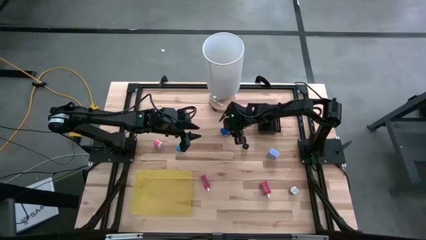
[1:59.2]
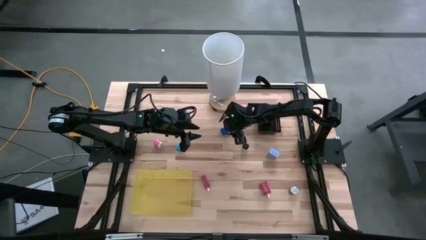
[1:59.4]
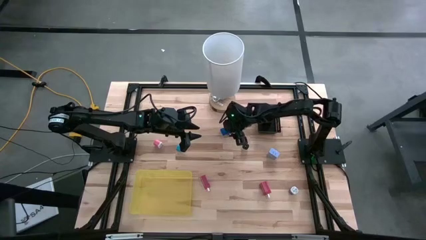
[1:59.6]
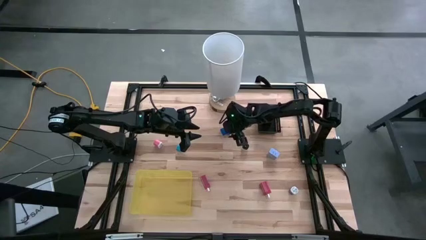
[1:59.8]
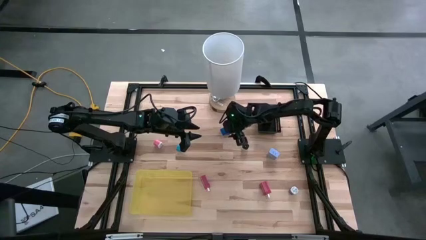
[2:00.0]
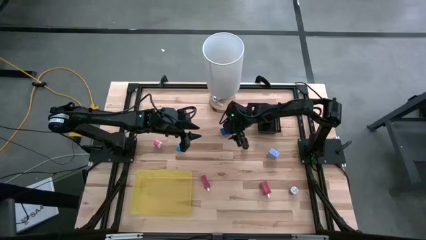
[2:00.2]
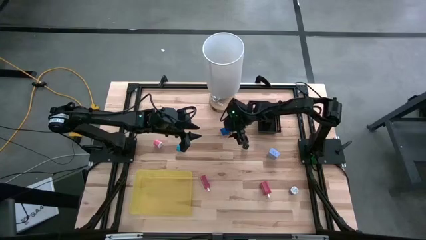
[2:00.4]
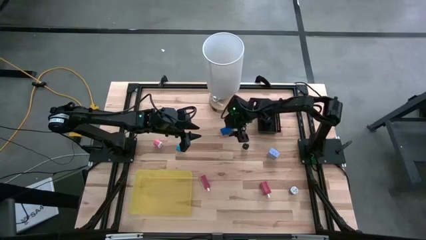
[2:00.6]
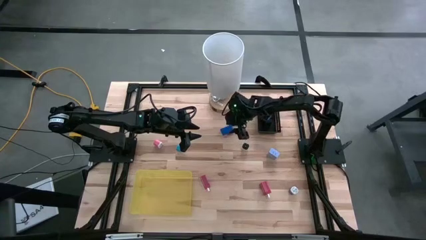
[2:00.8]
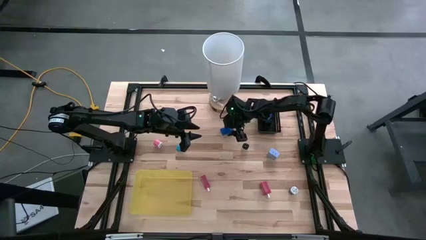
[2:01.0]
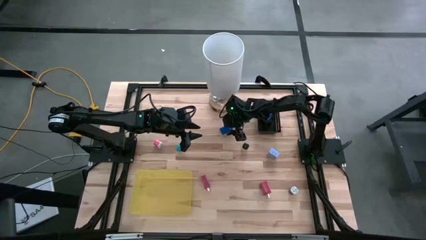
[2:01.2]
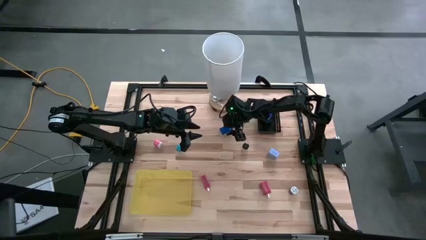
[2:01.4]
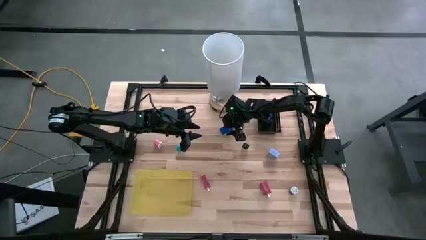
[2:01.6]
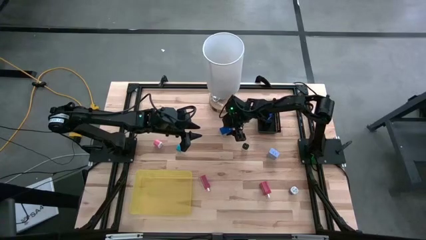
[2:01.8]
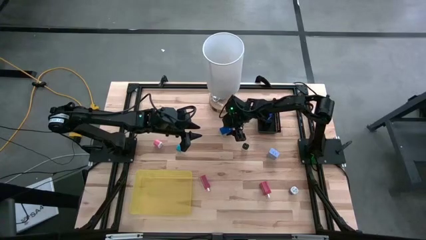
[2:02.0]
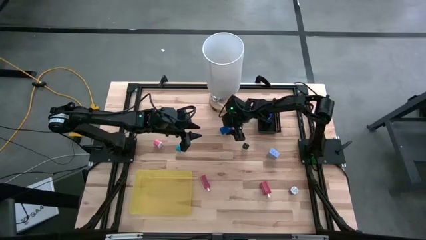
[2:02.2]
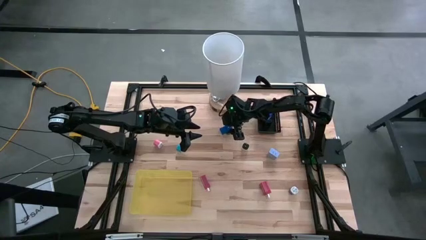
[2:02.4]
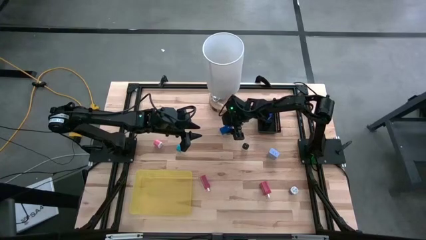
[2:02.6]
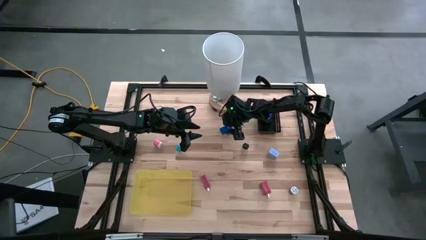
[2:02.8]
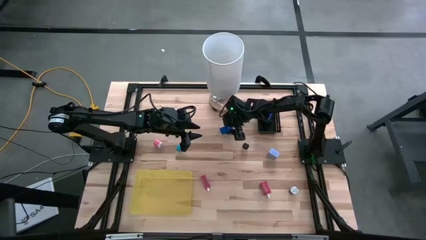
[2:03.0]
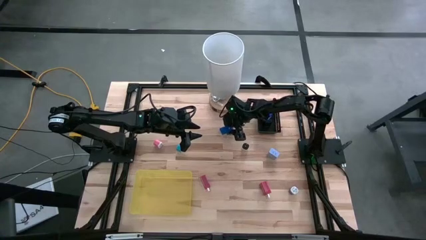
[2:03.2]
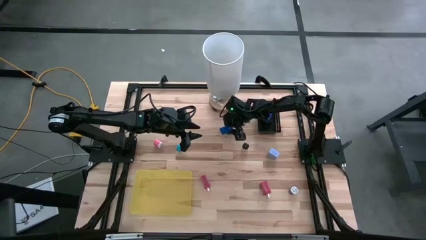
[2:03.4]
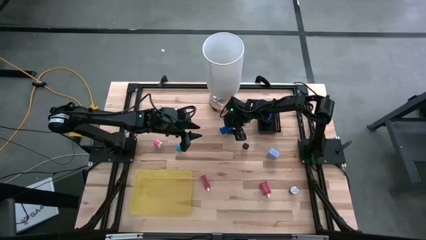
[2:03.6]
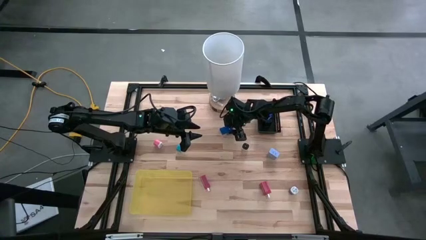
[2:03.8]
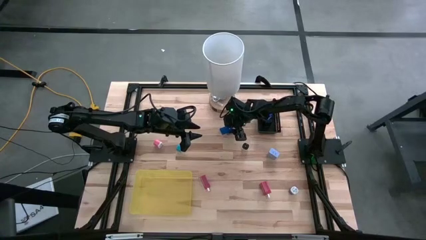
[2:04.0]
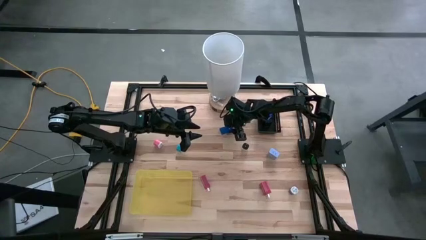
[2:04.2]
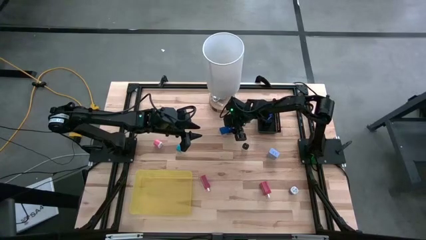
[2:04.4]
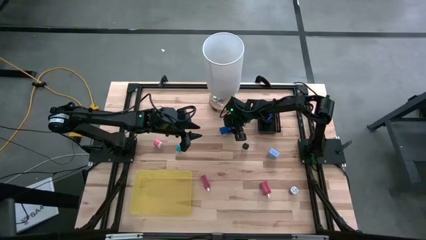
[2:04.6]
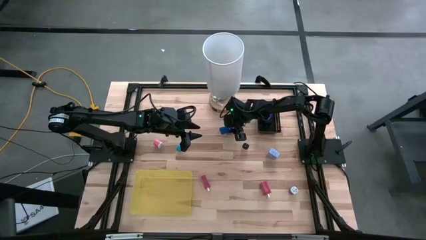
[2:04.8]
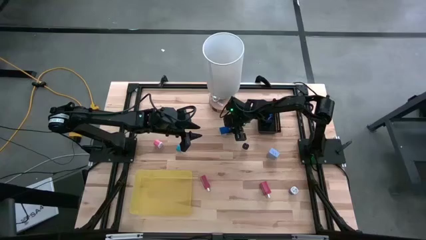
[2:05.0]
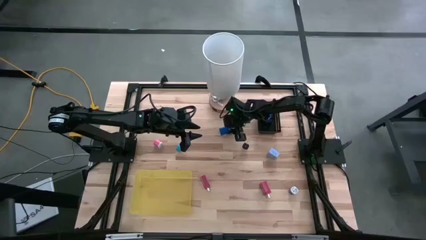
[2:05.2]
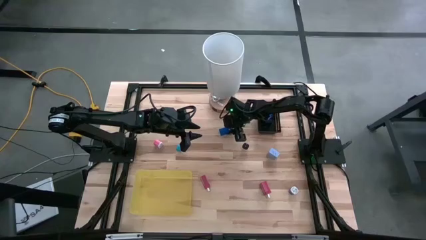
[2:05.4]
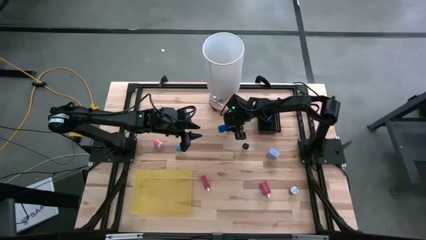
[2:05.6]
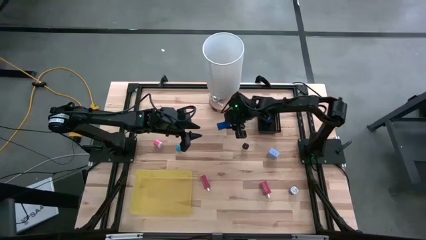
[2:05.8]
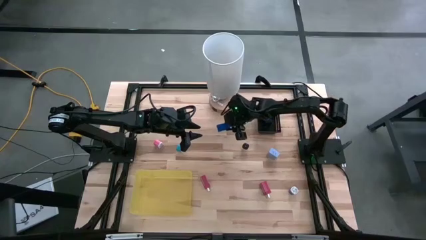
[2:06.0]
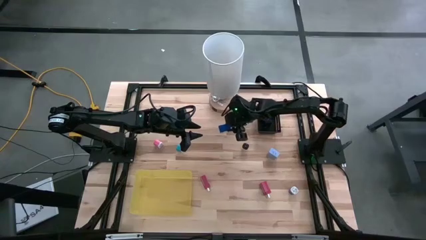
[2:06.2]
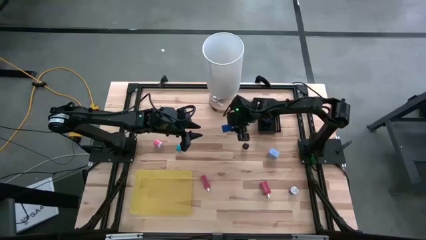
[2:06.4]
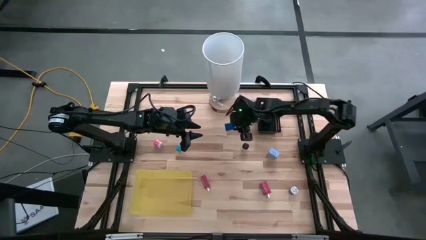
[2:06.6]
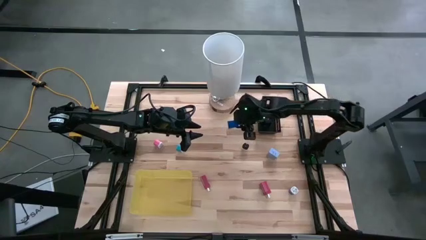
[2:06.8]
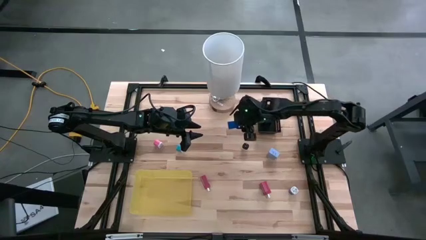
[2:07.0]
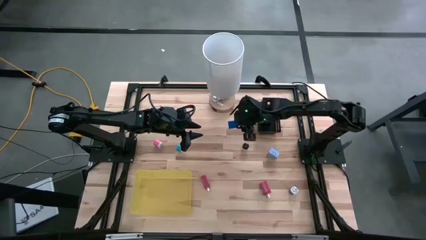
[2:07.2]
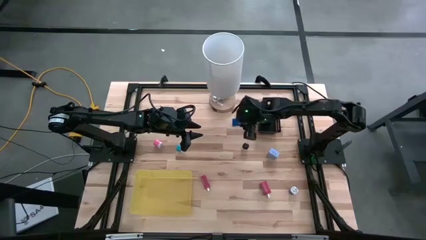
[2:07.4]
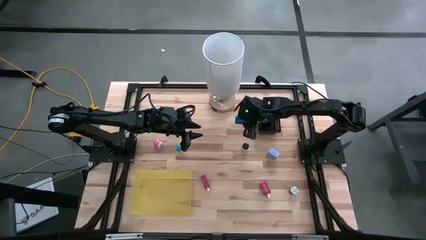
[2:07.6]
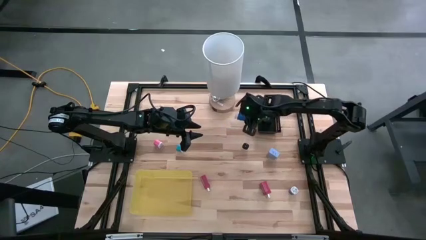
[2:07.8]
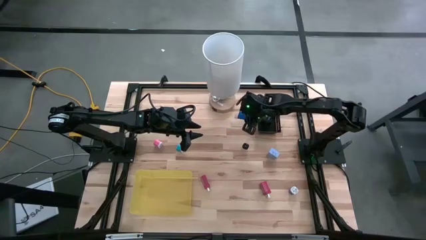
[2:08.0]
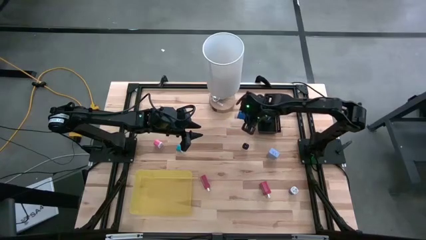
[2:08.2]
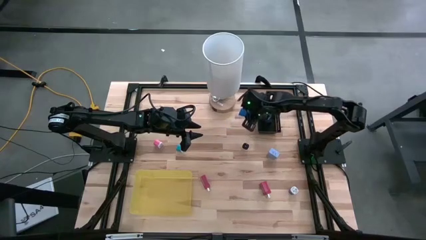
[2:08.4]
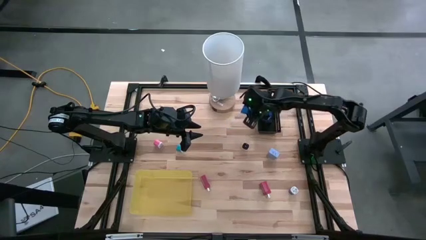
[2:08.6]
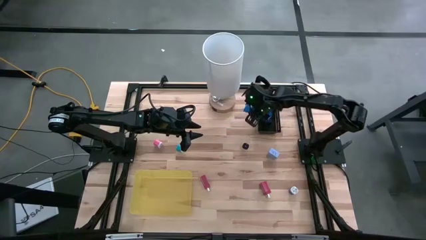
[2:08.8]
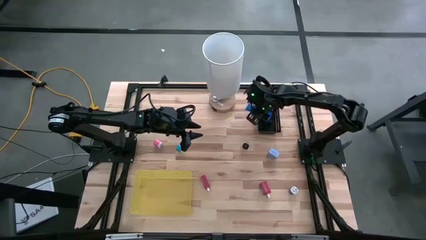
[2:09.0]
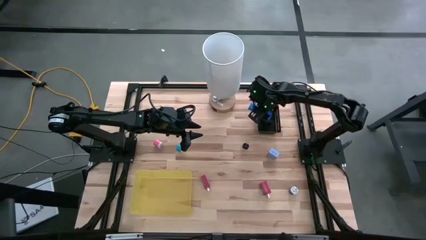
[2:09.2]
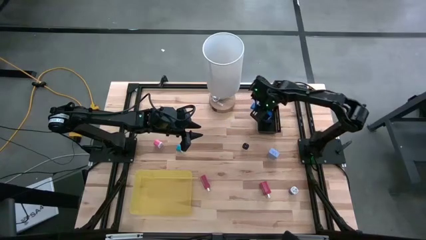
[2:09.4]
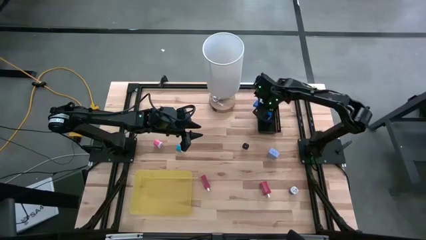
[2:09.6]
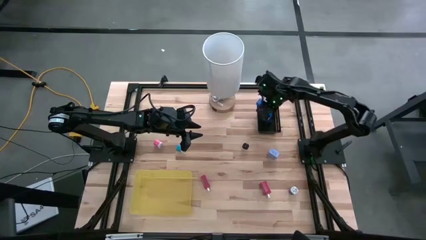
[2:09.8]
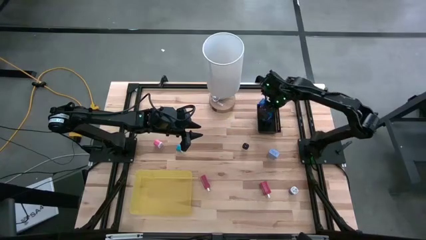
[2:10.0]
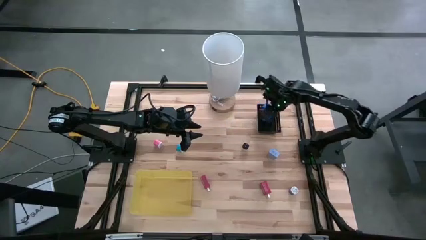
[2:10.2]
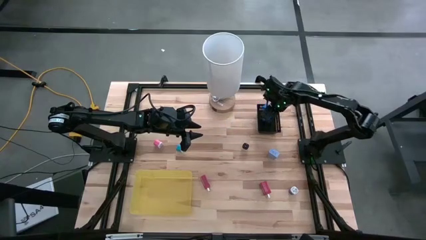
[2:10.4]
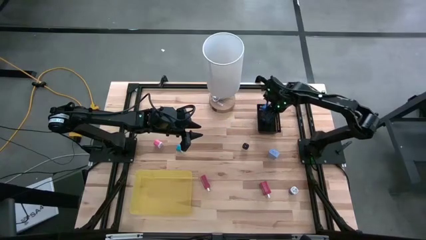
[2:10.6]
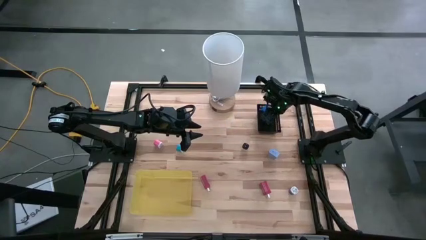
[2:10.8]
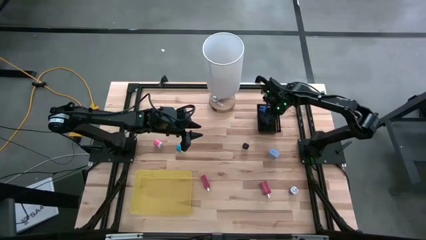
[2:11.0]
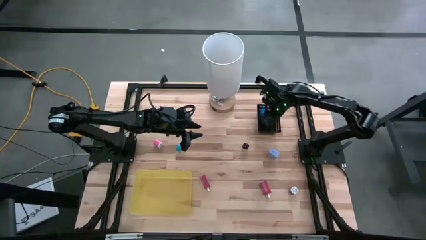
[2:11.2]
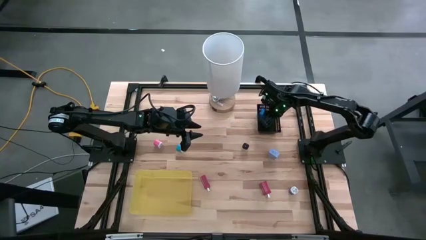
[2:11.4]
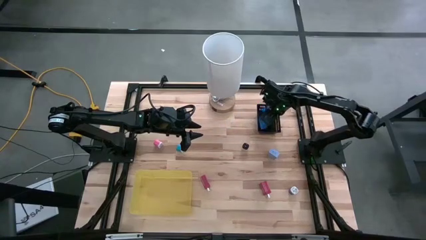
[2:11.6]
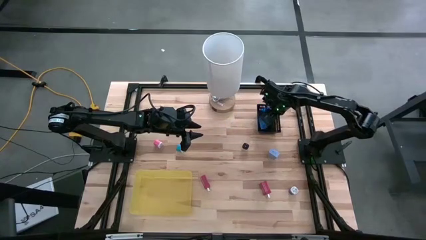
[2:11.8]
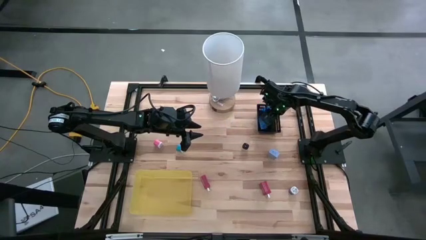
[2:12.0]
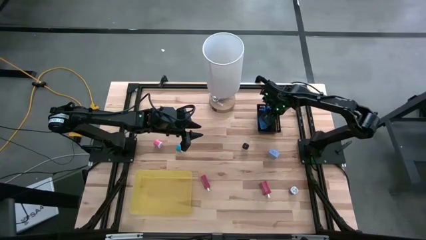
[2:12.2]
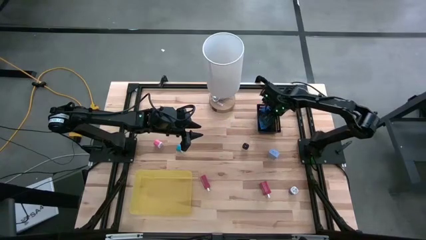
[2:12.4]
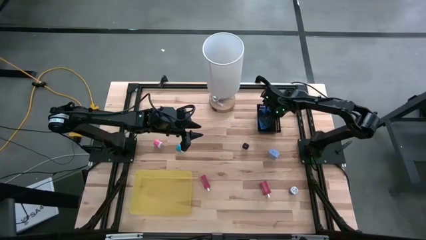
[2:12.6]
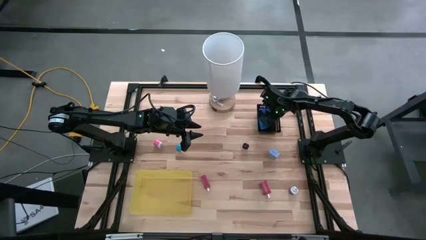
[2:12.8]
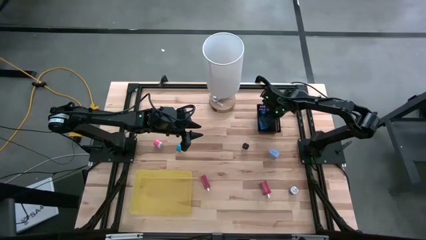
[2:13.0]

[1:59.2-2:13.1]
Task: Pick & Place Office items
Put the blue digital clock into the black bin

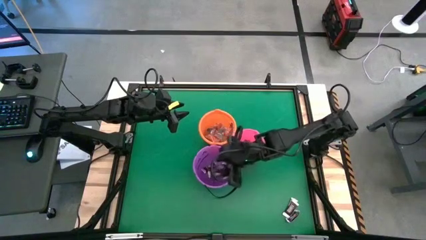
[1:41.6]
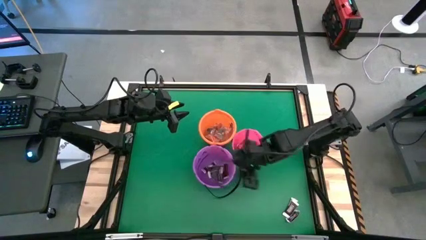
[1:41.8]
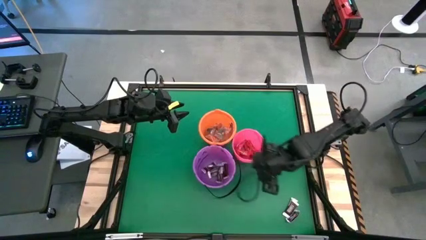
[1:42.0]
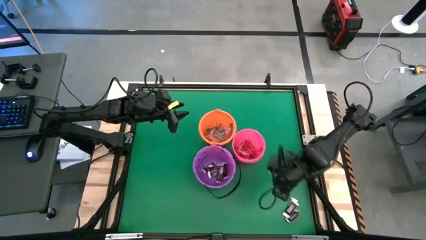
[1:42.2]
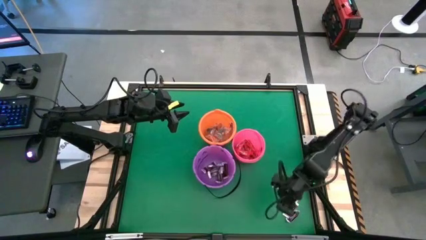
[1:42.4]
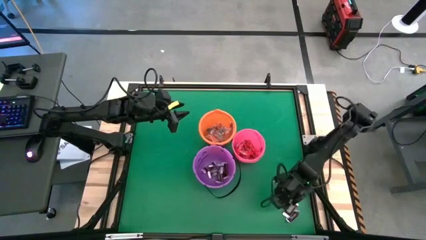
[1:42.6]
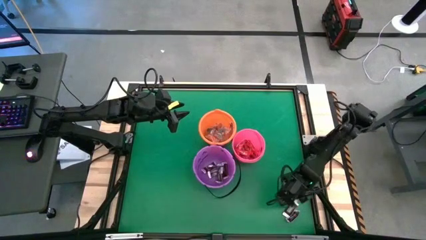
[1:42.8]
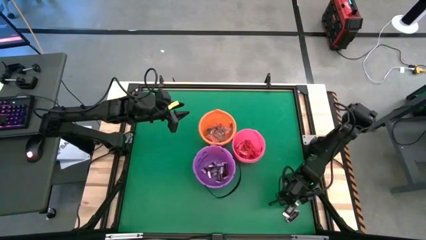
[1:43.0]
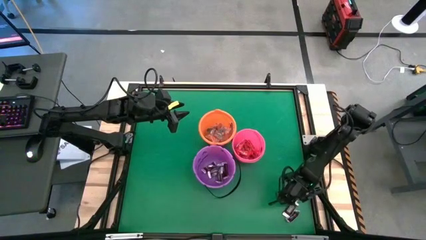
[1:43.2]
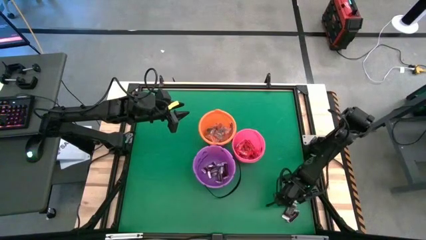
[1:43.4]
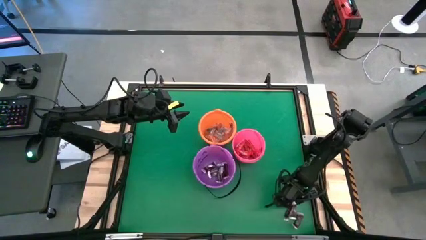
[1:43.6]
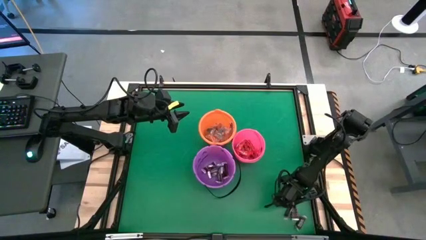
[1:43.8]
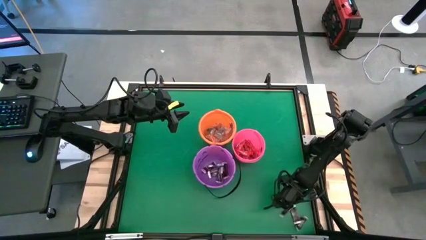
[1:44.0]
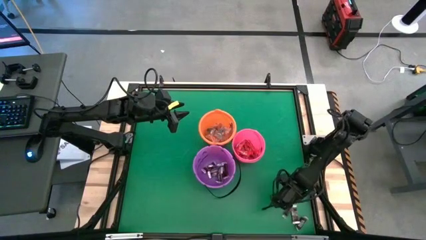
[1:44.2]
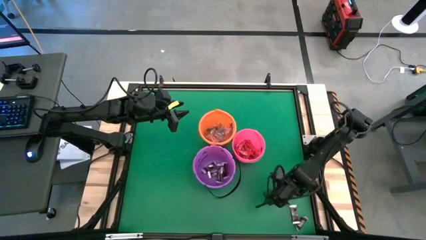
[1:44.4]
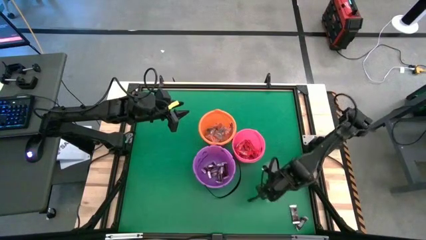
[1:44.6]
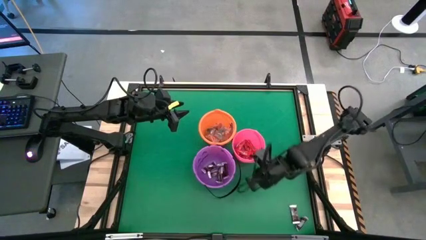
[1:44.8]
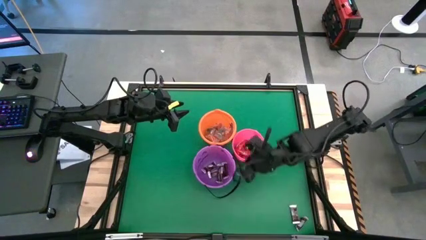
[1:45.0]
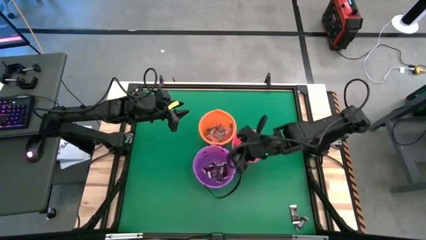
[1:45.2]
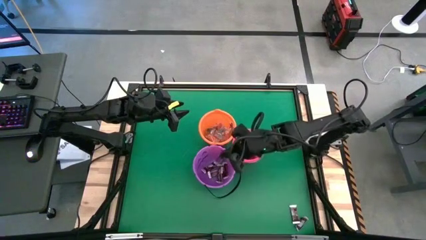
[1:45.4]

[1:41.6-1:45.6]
Task: Sort candy by brand, put in halloween buckets
Put the brown chocolate bar into the purple bucket
